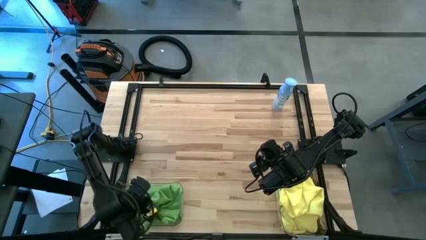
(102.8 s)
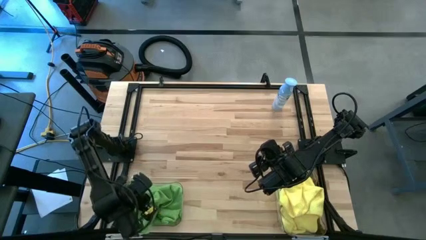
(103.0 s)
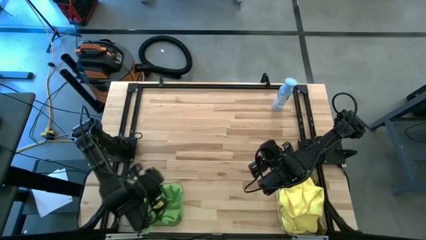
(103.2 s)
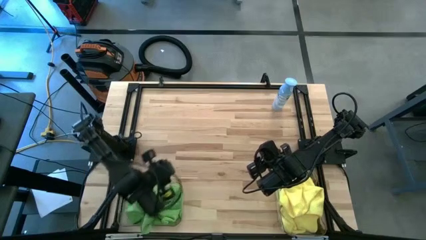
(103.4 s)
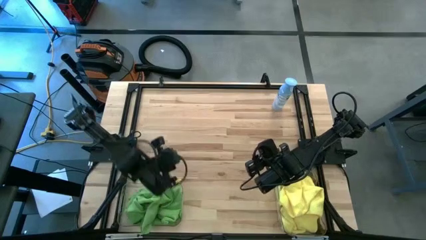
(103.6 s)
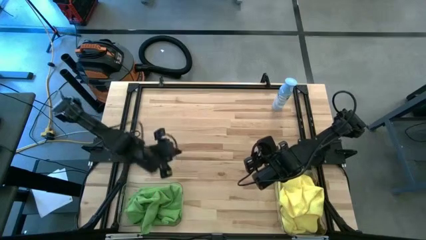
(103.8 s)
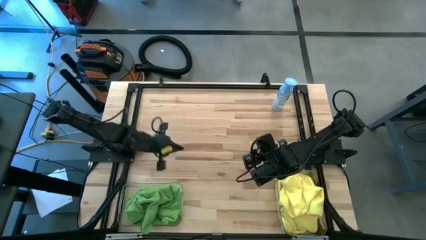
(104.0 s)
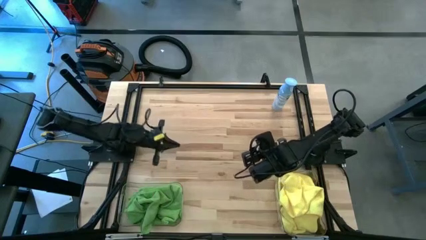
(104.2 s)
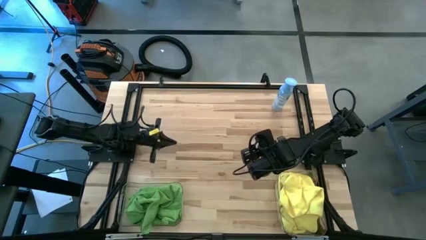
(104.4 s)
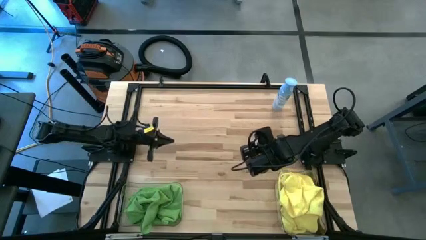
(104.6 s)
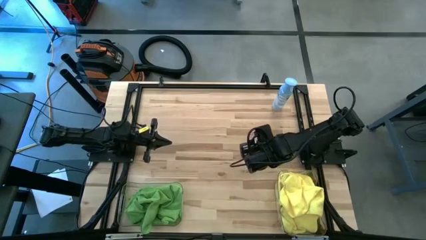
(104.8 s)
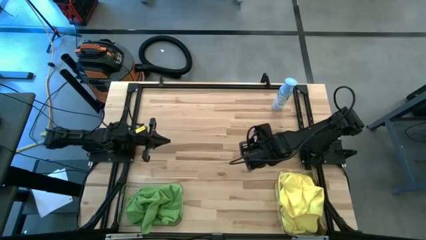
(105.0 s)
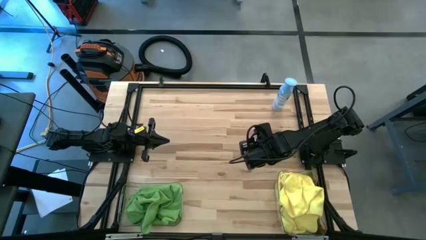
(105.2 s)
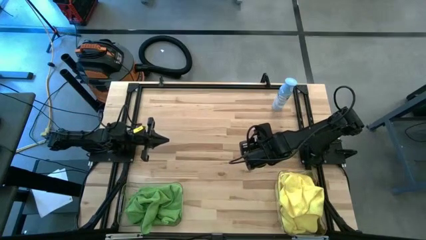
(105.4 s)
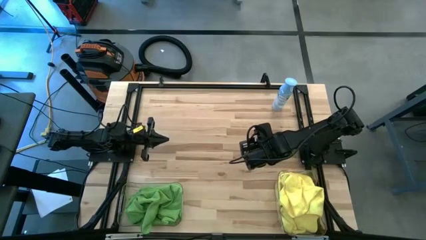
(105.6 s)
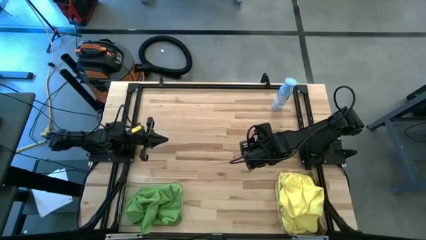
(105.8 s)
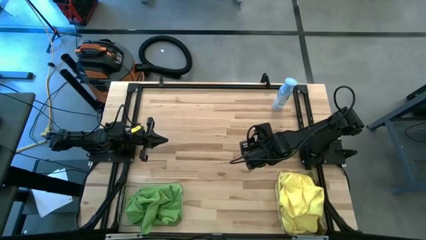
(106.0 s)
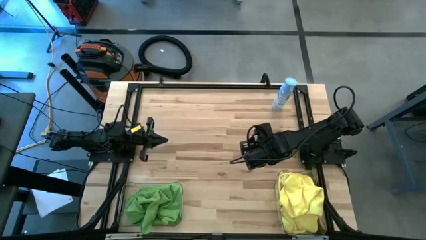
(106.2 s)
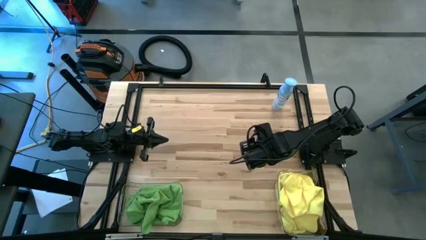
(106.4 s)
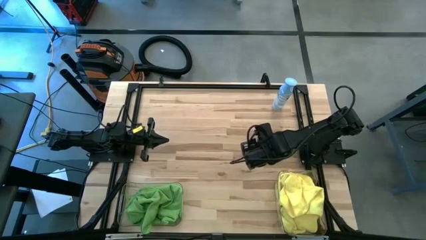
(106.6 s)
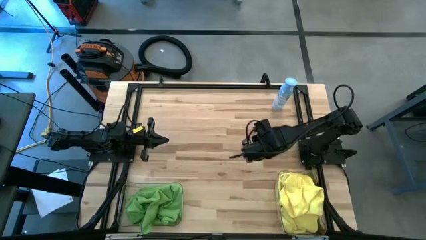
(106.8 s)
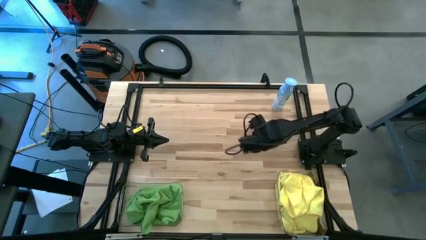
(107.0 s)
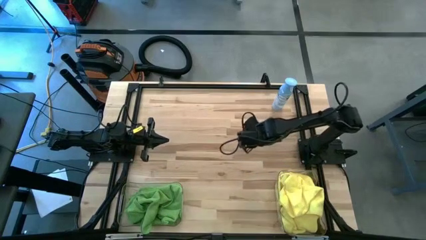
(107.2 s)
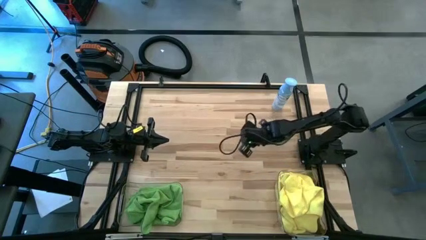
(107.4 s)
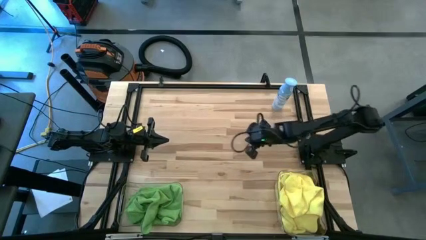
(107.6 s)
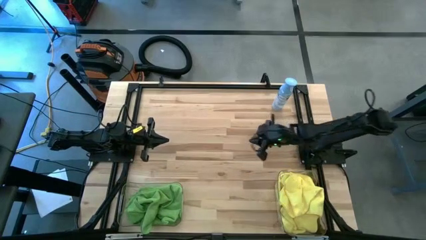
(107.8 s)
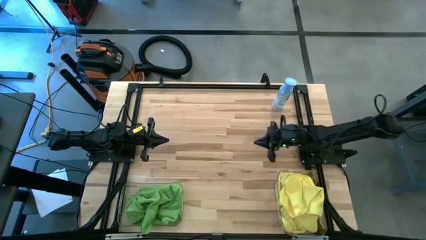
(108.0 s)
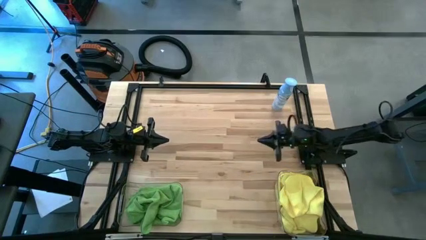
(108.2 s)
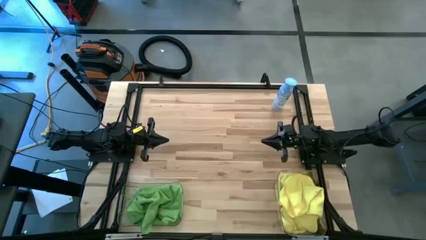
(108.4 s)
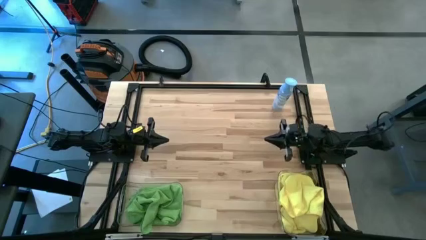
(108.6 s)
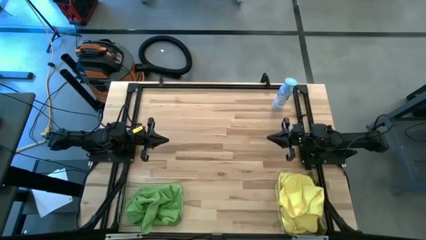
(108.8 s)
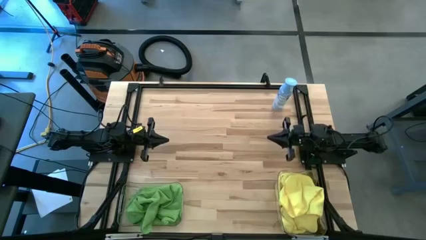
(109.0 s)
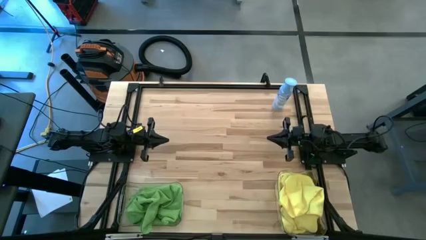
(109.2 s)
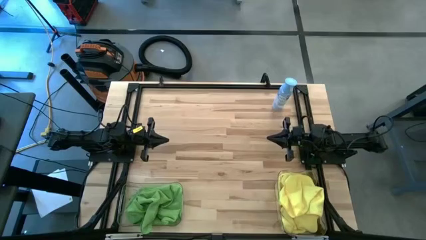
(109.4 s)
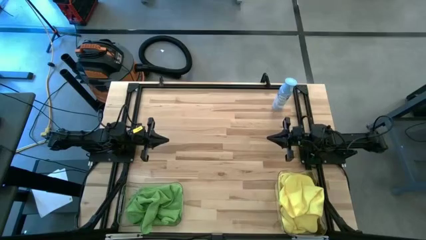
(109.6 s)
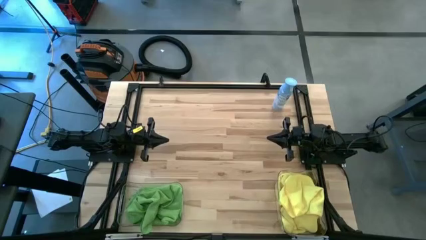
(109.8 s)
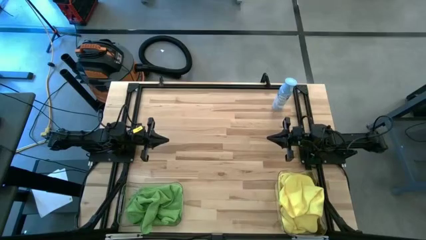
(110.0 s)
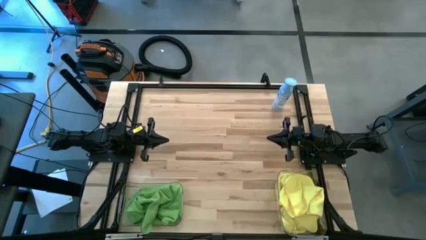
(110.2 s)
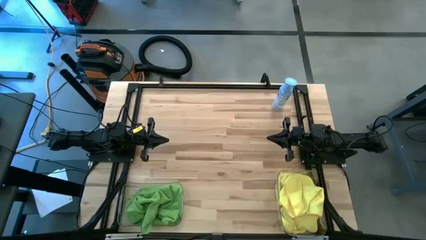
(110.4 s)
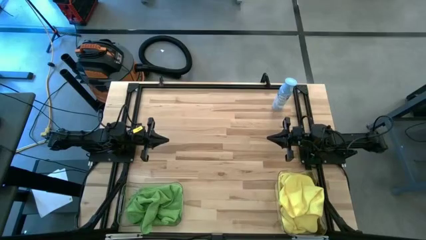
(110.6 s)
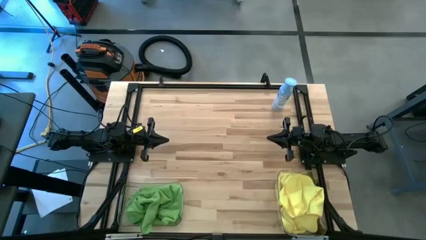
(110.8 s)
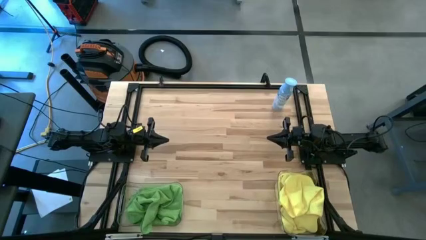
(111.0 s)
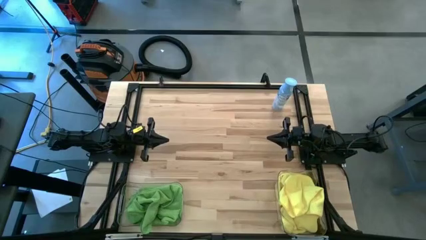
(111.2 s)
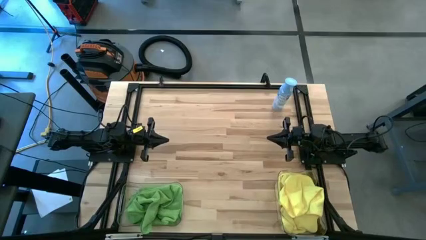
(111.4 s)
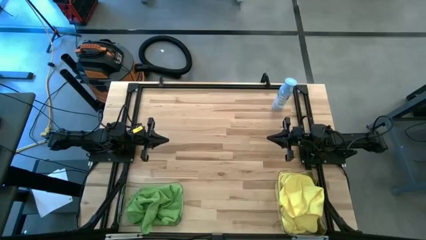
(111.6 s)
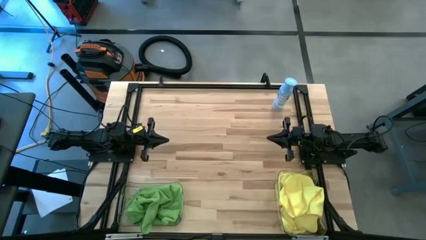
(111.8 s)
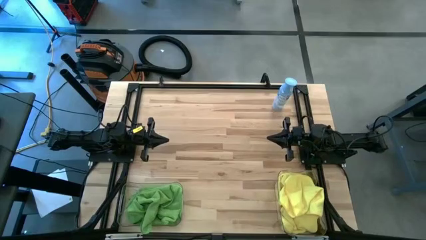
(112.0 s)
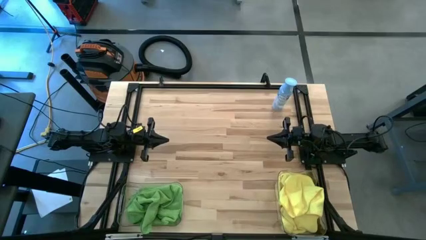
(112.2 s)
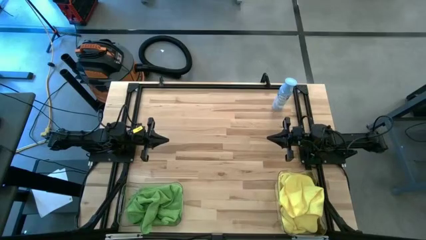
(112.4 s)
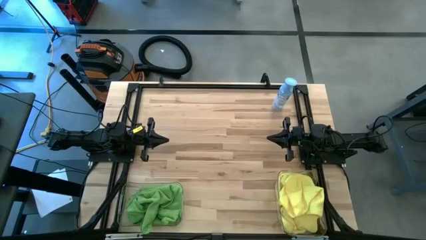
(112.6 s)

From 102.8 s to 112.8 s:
Task: Sort microfiber towel by color & place in baskets
Return to Home Position

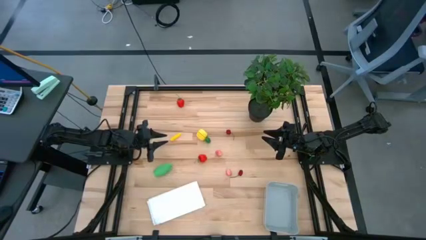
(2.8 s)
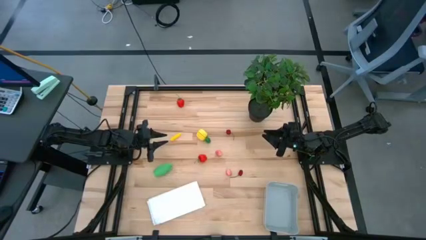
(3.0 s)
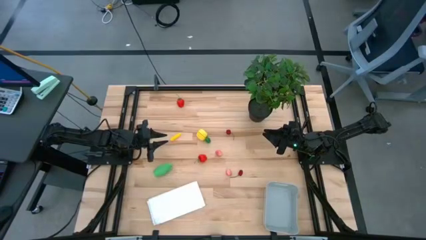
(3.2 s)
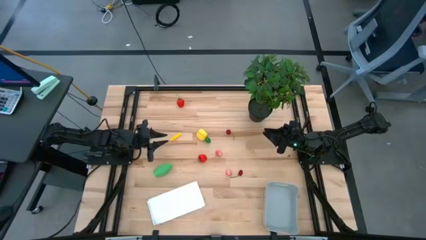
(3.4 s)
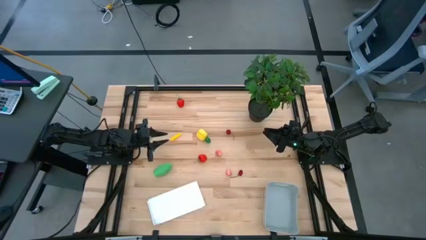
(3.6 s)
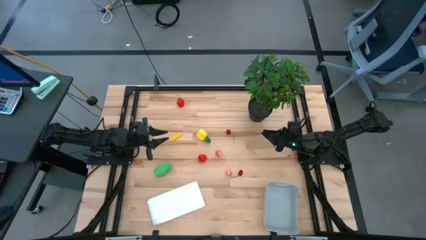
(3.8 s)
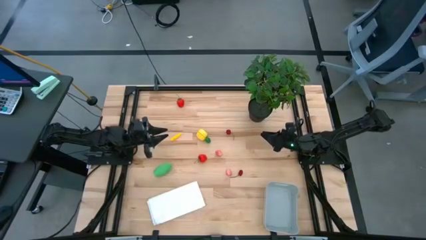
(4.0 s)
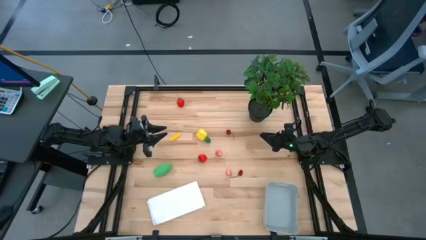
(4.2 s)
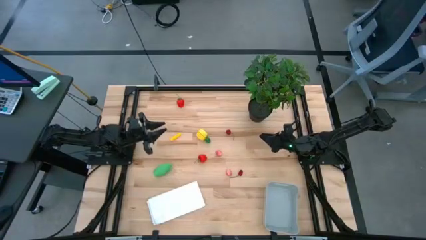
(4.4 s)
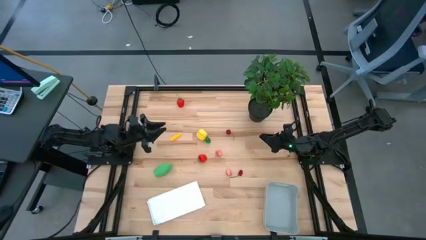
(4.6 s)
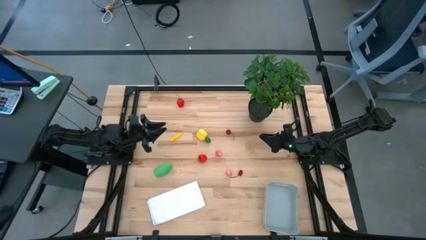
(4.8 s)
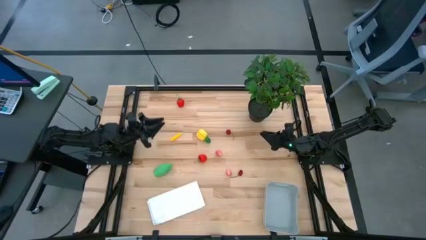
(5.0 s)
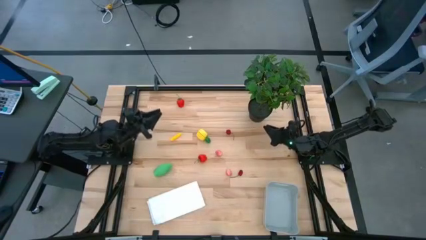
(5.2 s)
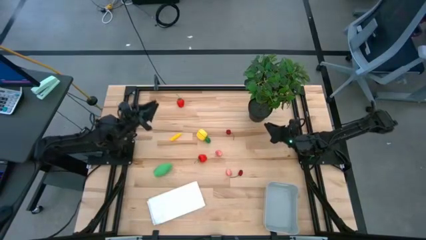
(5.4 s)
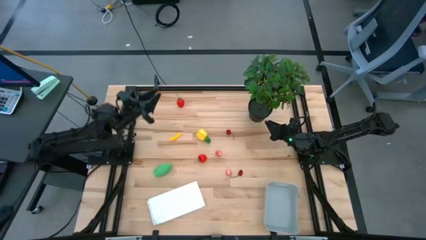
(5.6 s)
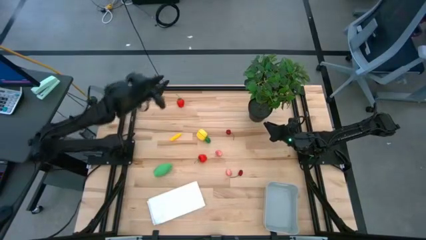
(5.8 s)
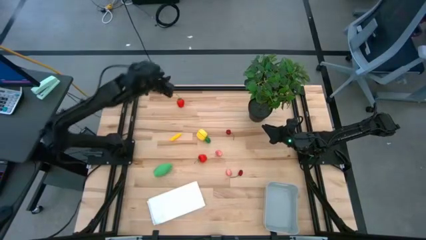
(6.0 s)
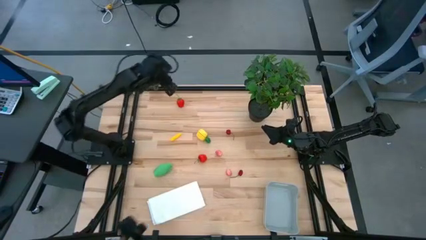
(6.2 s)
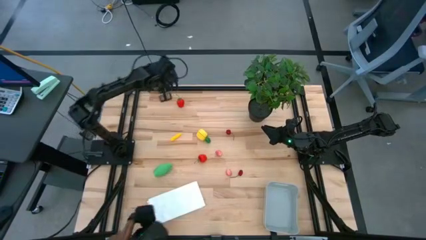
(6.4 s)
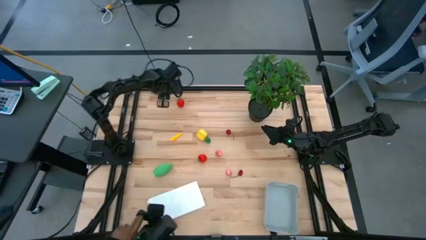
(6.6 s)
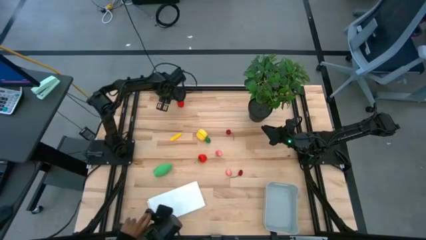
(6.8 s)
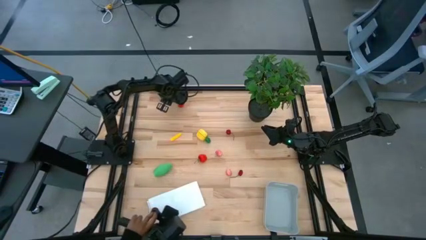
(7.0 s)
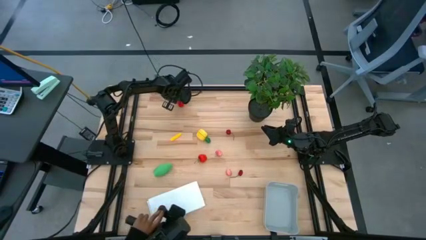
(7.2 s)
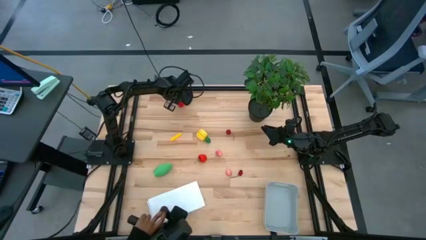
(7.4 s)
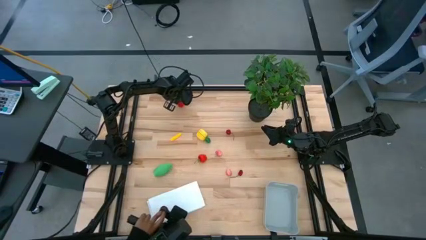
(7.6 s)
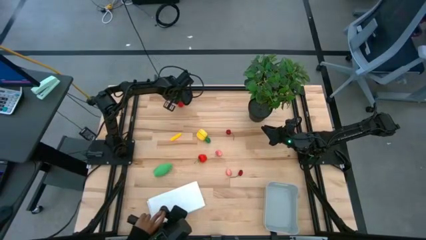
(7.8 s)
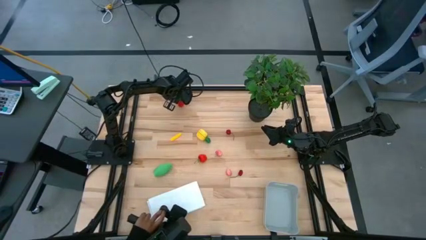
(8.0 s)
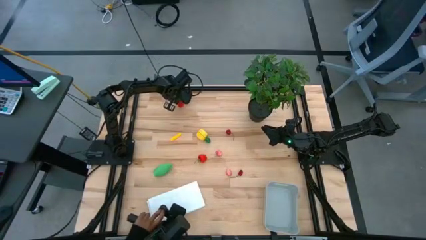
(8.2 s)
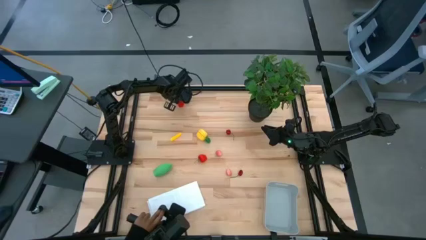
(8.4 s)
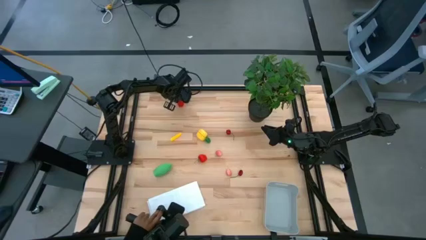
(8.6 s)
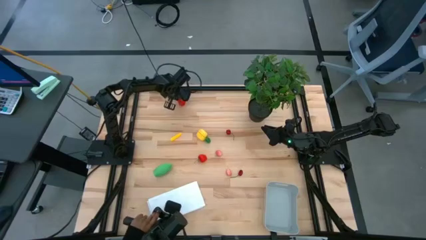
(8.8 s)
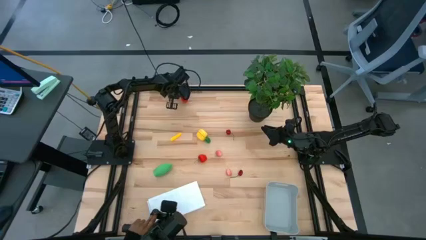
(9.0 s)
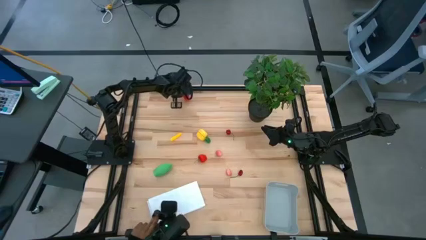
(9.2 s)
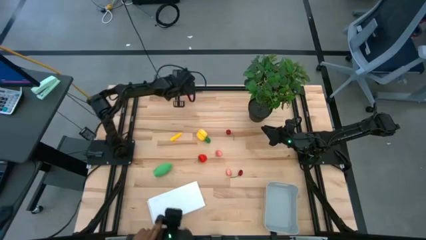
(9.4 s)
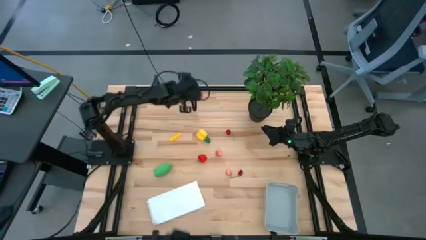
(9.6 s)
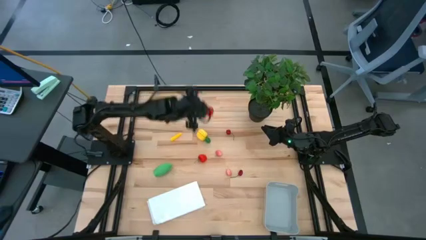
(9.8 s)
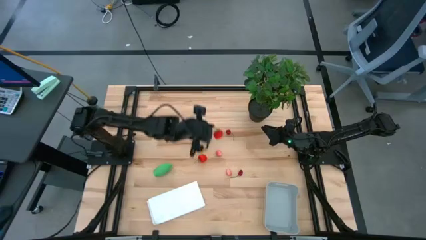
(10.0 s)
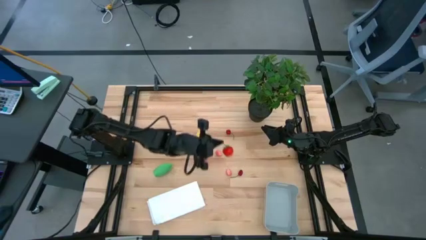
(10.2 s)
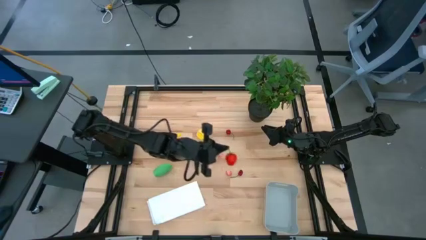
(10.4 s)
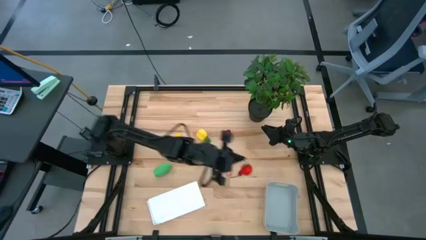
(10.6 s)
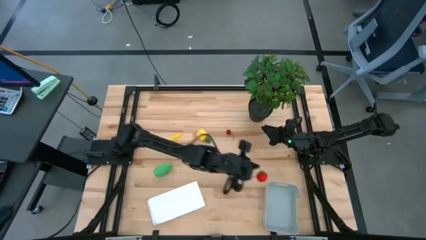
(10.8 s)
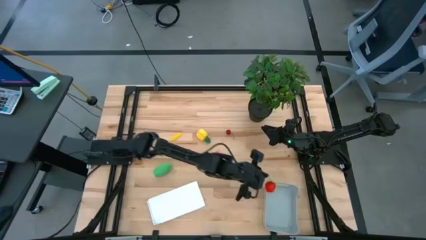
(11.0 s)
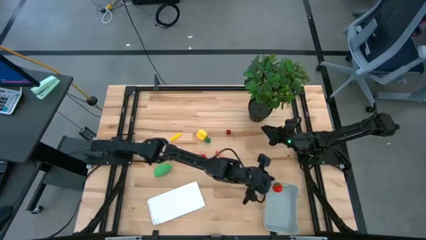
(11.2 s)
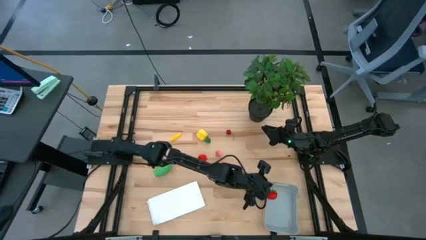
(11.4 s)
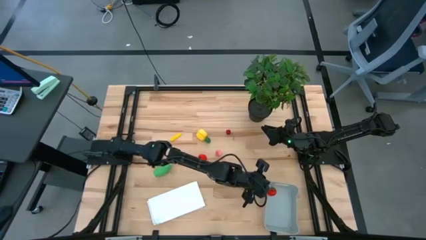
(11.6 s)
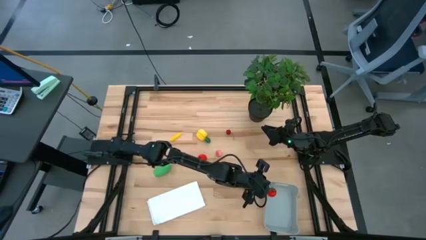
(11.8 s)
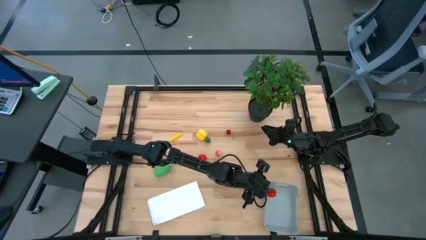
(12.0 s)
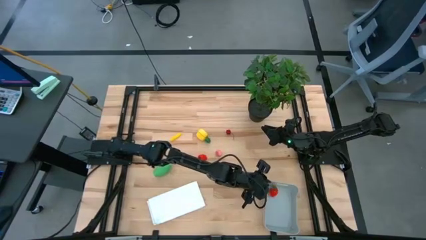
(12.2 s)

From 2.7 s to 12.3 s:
Task: Pick and placing Produce into tupperware
Put the left red strawberry into the gray bin
